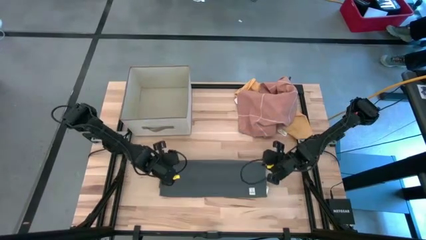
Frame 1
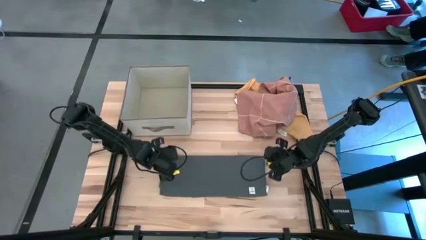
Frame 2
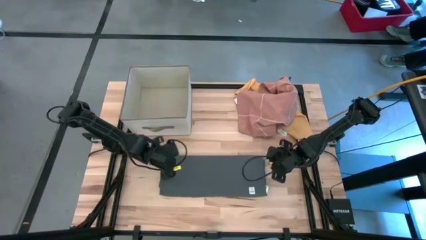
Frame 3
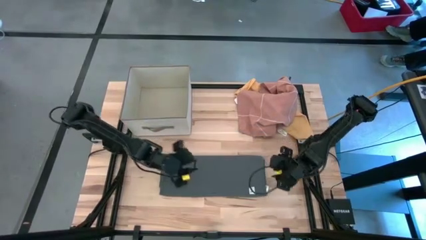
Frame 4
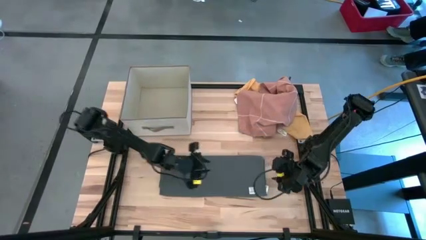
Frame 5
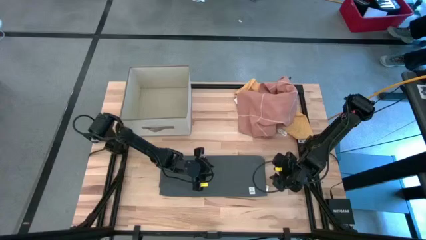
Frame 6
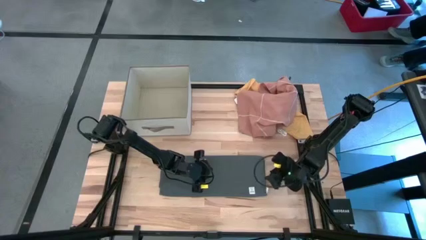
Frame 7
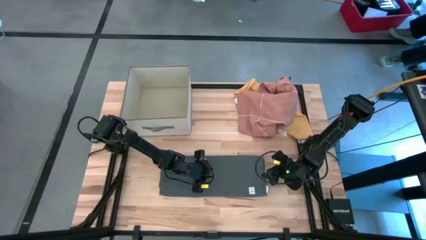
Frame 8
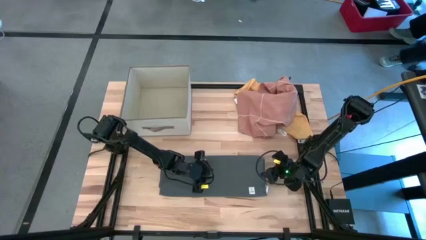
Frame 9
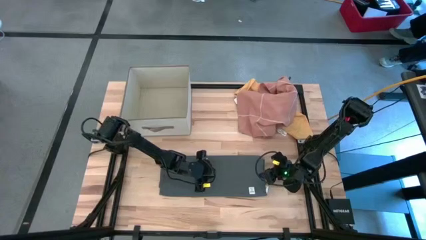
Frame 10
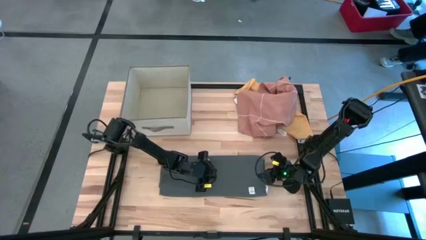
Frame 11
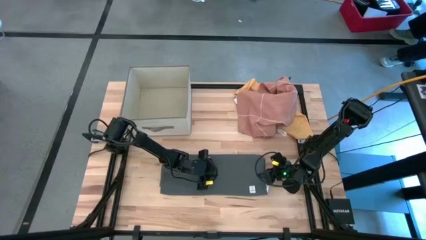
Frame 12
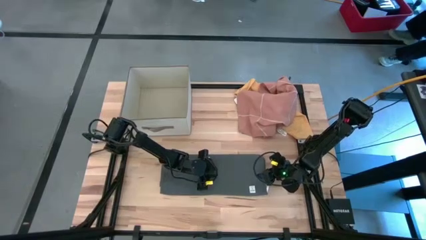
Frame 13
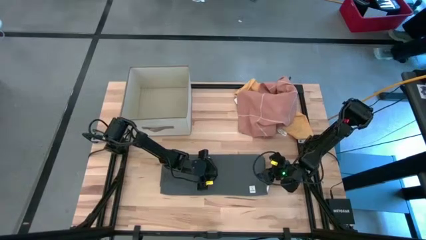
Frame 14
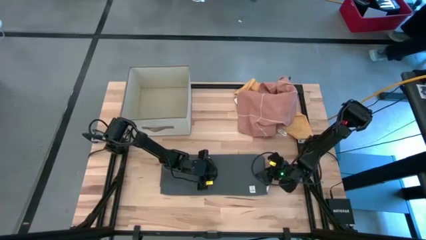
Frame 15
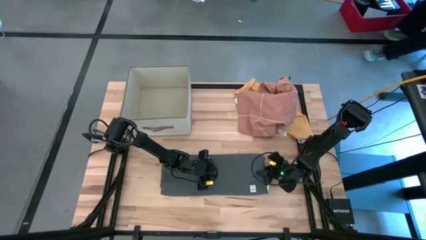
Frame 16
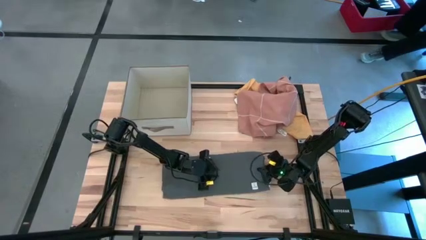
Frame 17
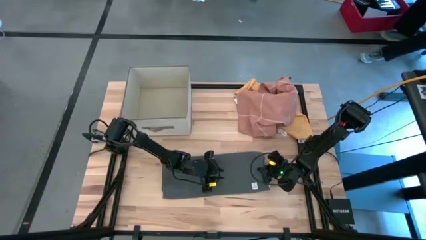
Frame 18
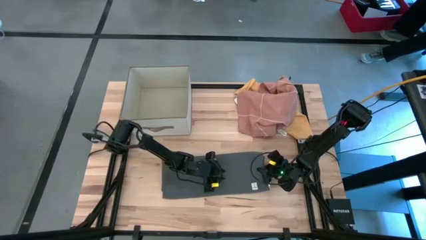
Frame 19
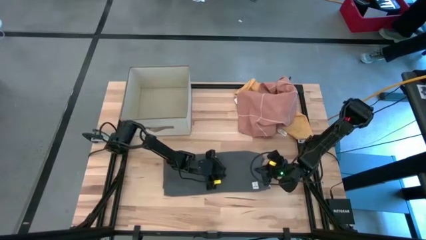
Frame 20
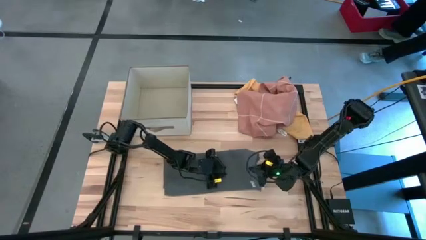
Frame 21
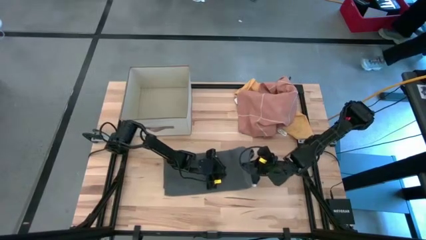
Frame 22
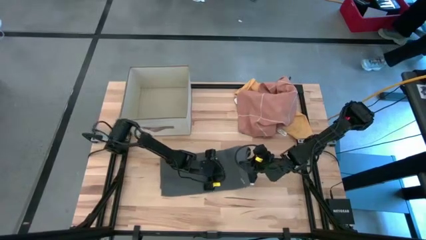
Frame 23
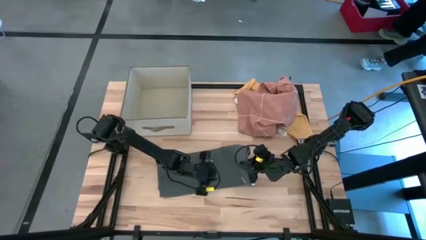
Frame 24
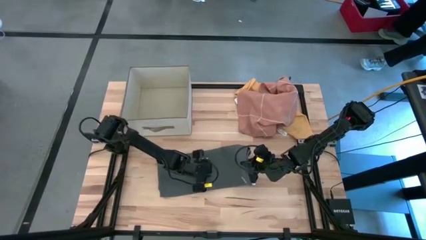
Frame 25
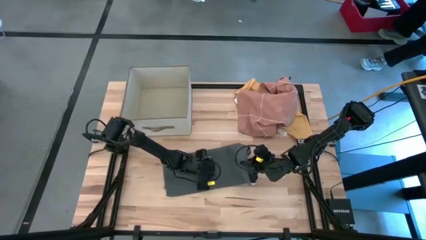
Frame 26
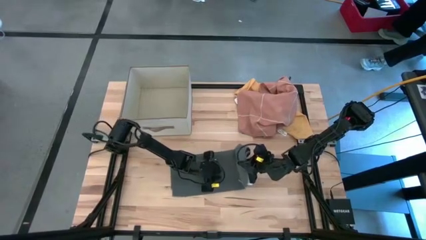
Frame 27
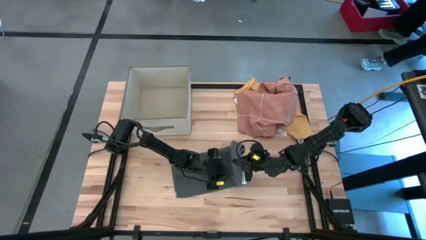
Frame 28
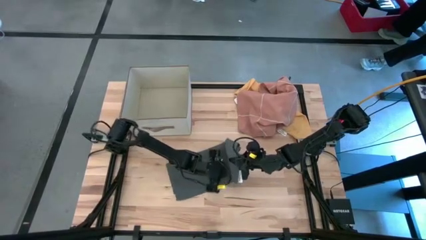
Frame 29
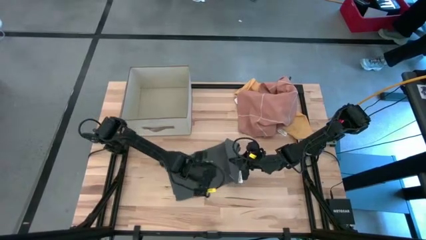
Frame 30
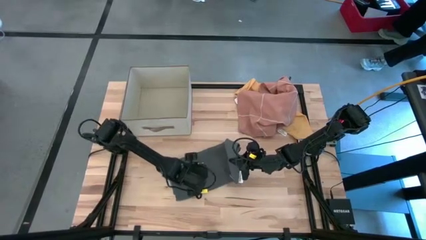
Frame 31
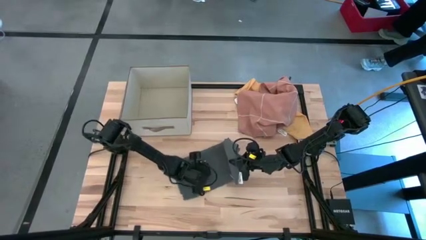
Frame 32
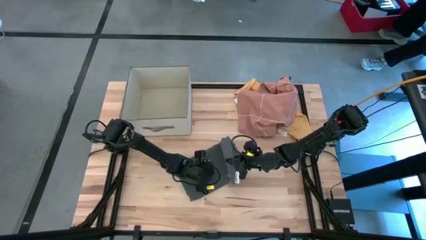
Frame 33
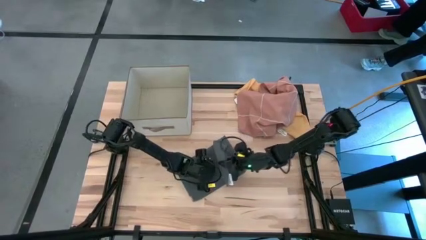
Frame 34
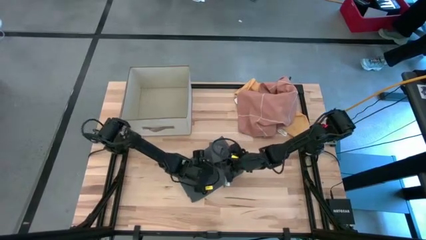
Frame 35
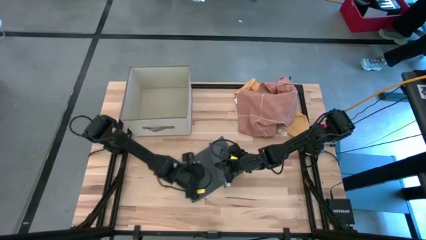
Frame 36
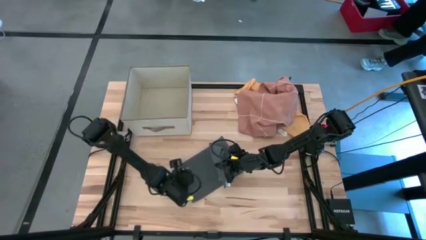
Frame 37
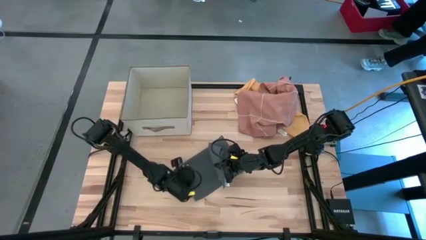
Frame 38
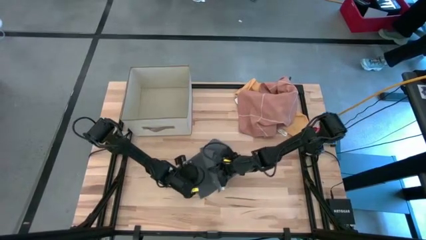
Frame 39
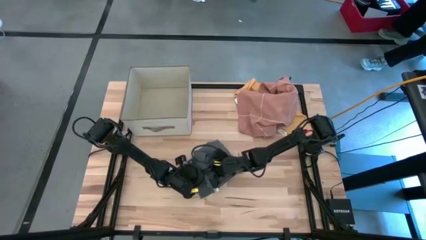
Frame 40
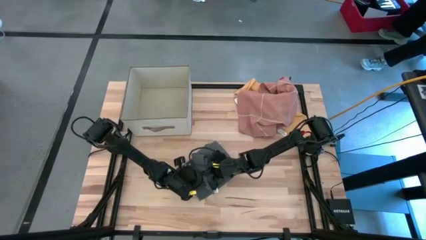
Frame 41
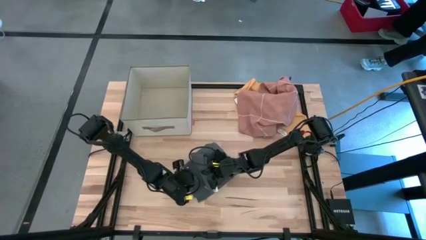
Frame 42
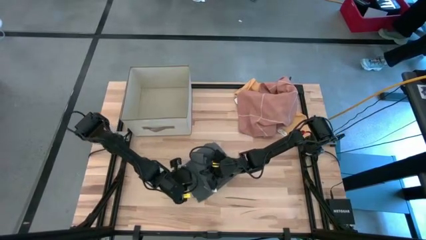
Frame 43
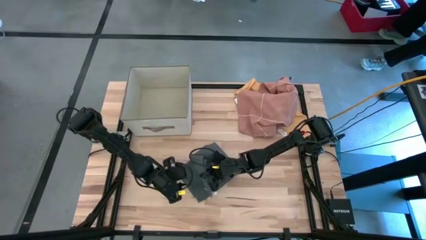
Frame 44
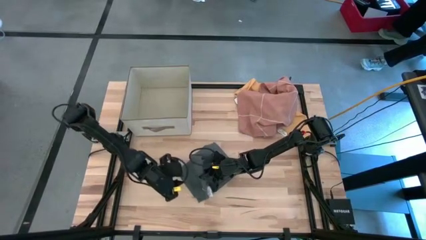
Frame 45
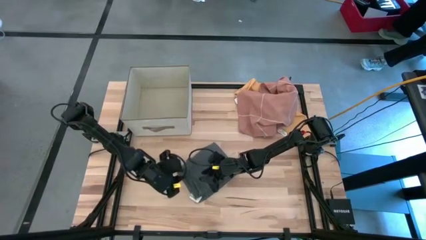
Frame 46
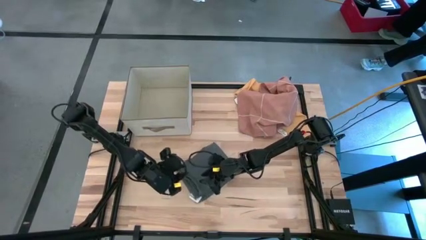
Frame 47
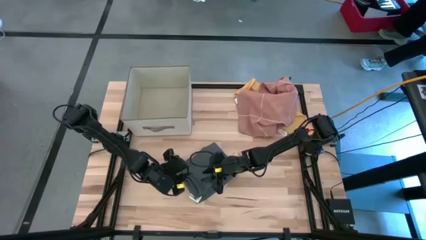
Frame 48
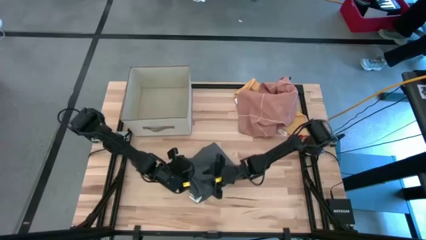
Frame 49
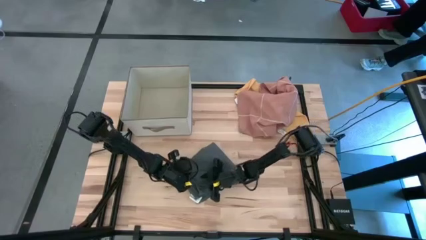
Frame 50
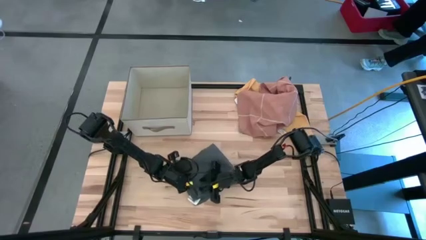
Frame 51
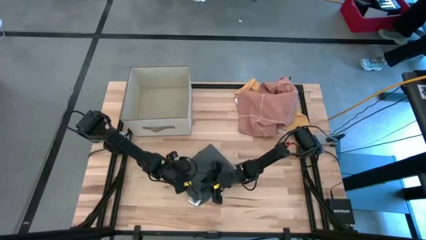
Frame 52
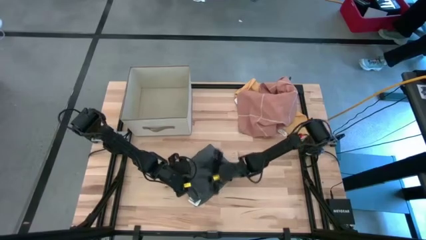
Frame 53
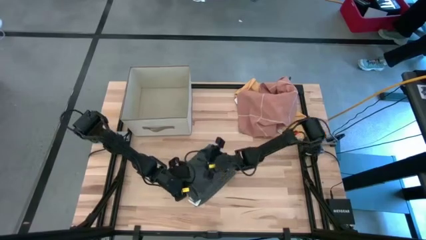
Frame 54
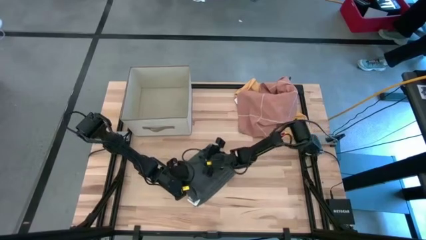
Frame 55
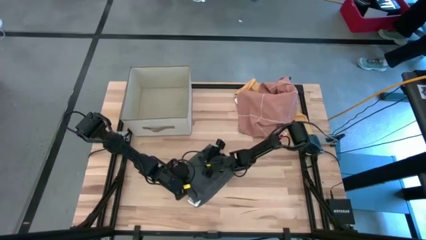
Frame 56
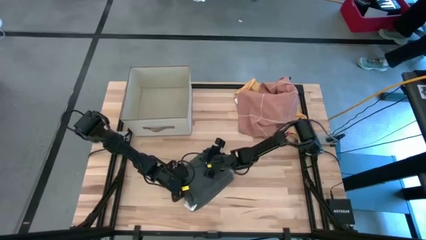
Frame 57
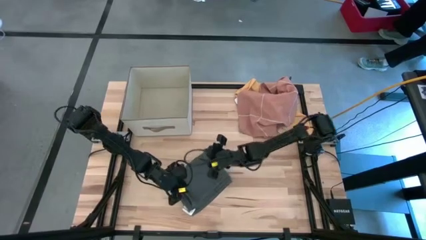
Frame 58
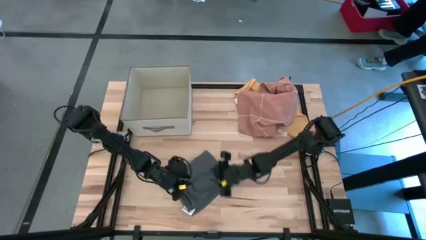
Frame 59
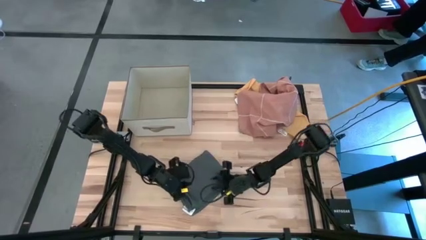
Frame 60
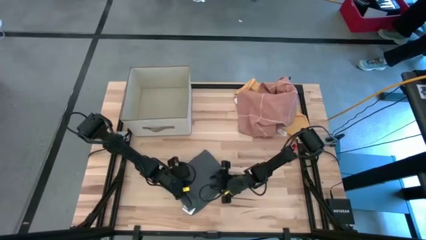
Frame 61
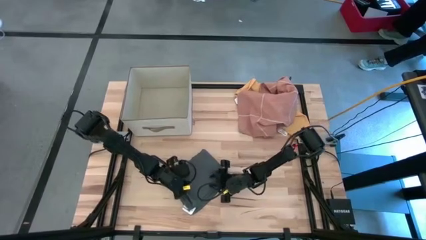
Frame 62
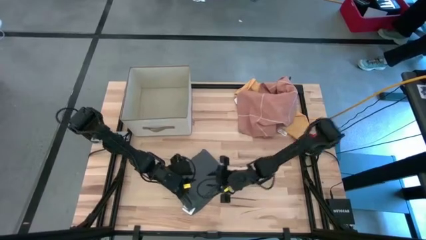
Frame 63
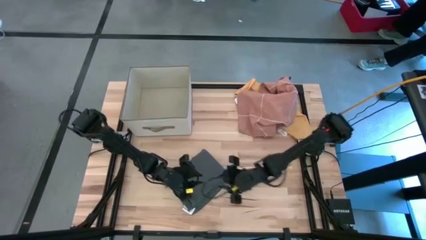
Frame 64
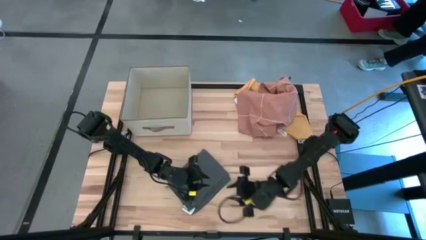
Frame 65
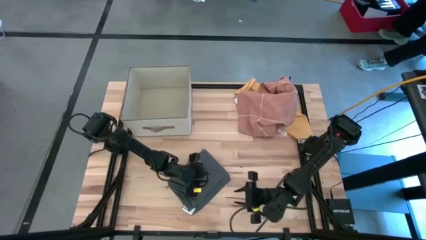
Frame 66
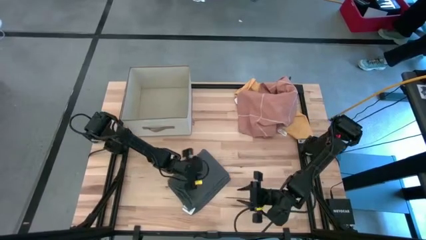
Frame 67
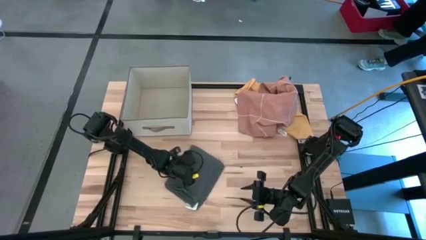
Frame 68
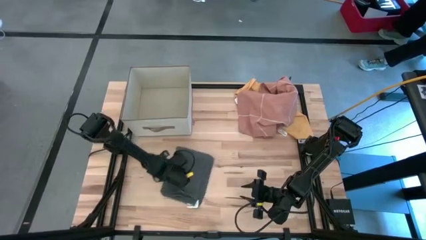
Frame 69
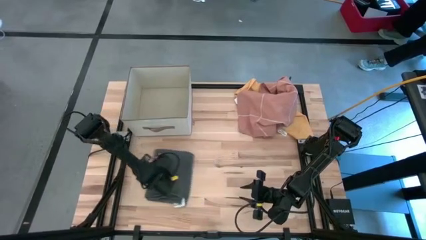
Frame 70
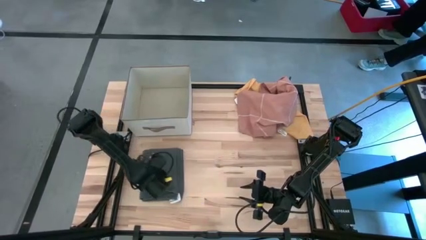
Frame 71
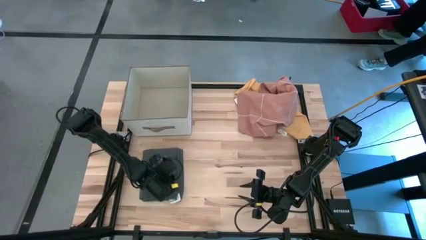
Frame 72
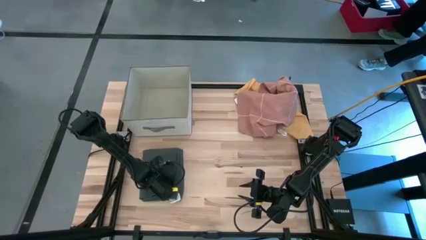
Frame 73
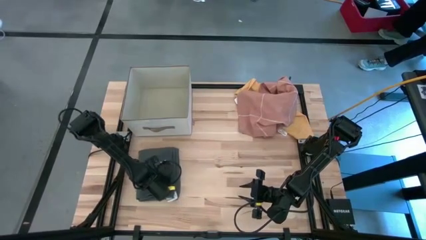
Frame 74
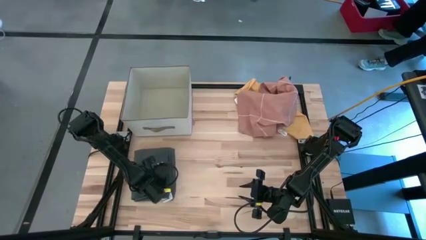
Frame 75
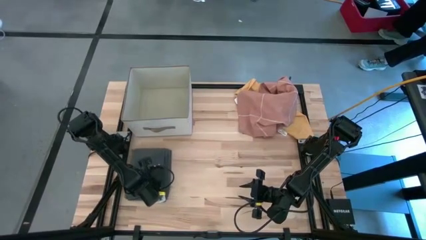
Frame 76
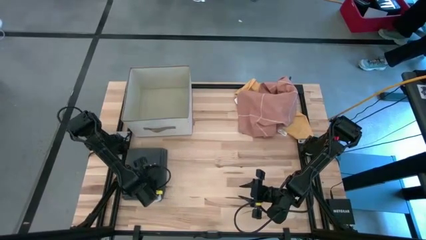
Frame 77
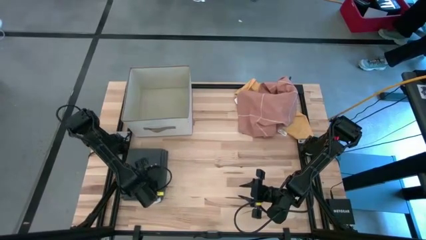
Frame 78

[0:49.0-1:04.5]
Task: Fold towel
Fold the grey towel
